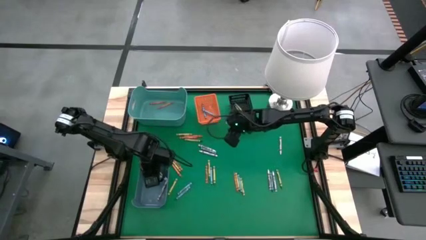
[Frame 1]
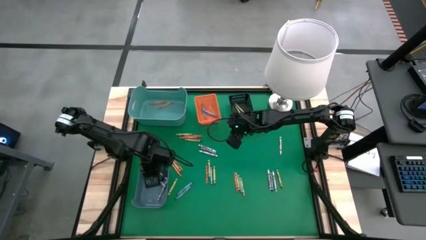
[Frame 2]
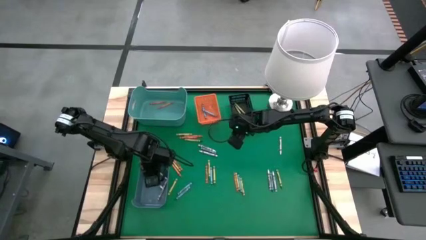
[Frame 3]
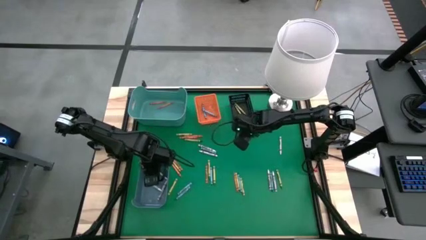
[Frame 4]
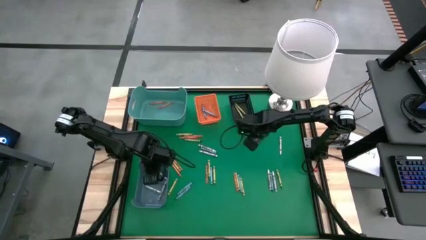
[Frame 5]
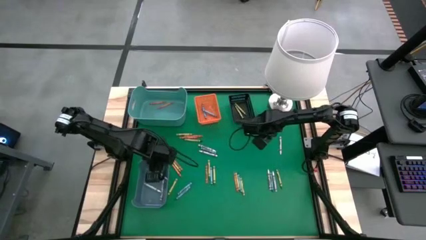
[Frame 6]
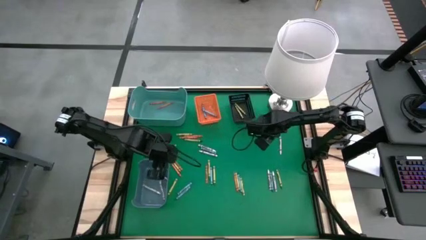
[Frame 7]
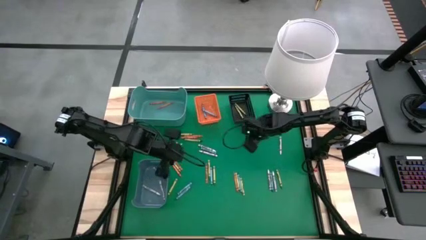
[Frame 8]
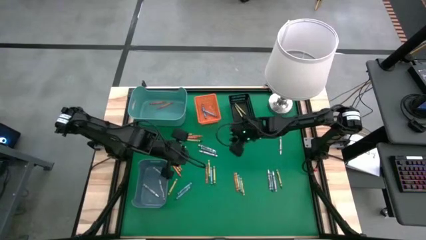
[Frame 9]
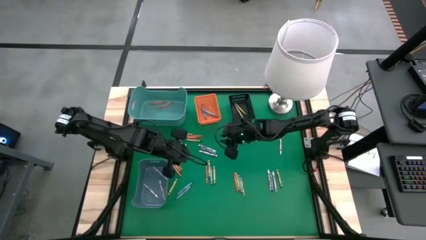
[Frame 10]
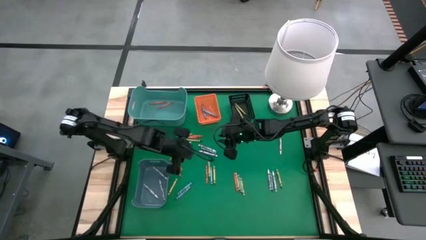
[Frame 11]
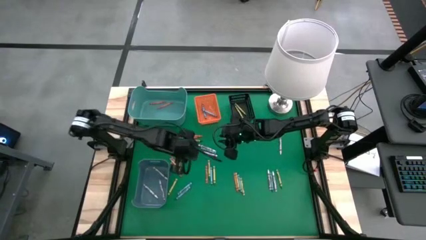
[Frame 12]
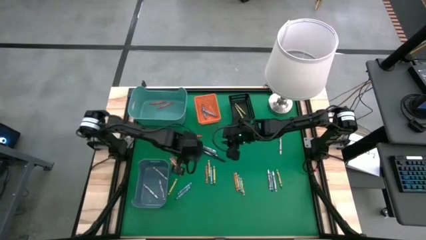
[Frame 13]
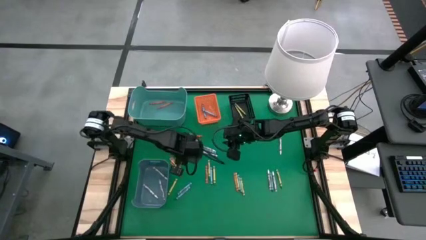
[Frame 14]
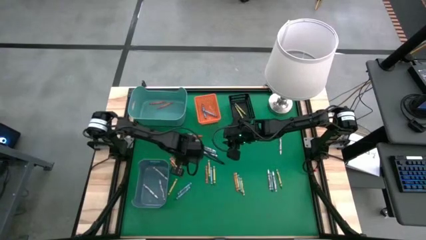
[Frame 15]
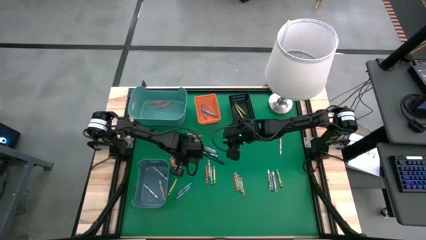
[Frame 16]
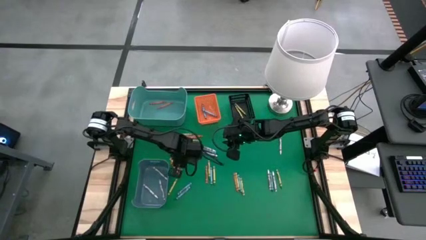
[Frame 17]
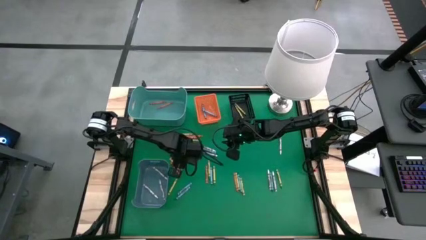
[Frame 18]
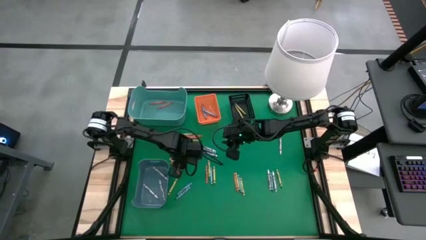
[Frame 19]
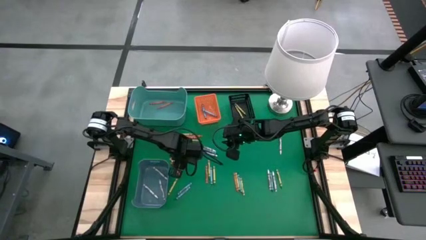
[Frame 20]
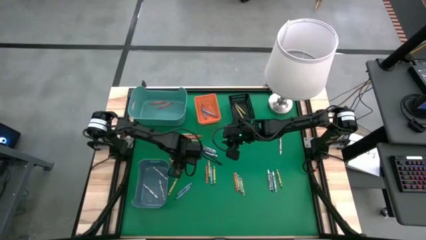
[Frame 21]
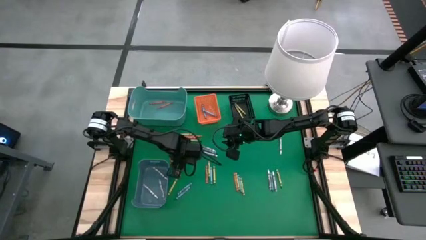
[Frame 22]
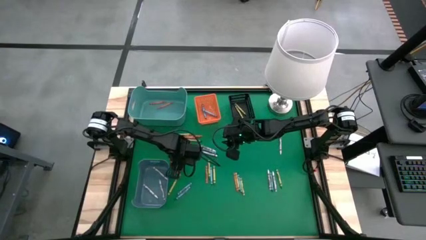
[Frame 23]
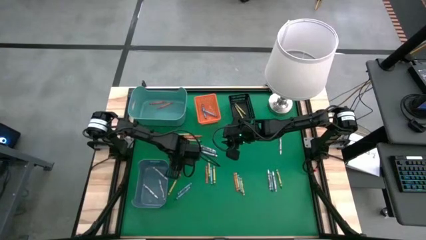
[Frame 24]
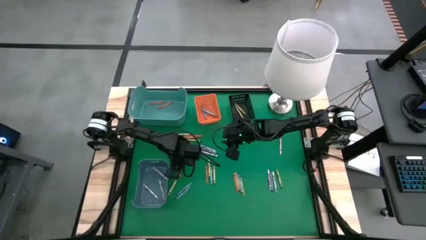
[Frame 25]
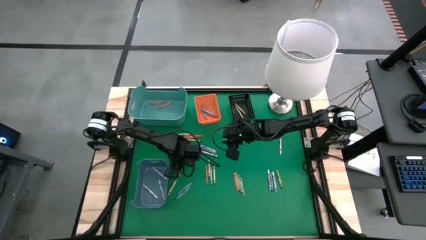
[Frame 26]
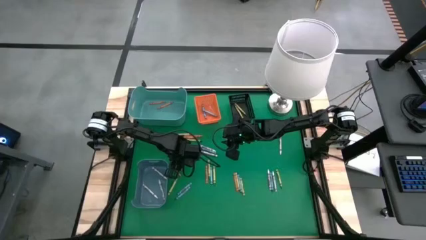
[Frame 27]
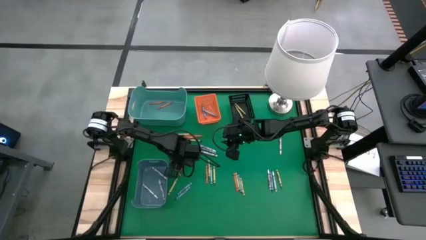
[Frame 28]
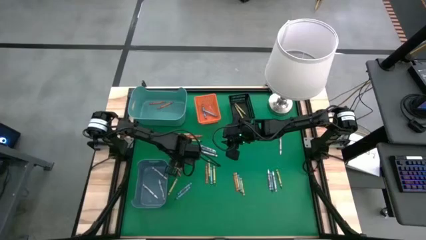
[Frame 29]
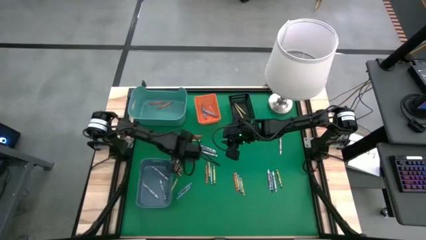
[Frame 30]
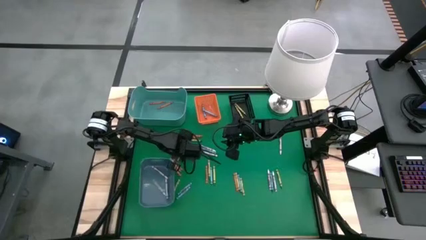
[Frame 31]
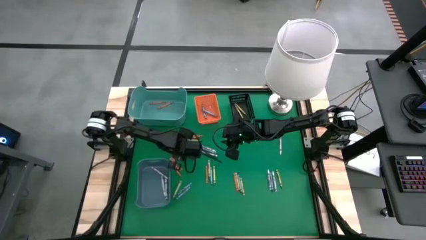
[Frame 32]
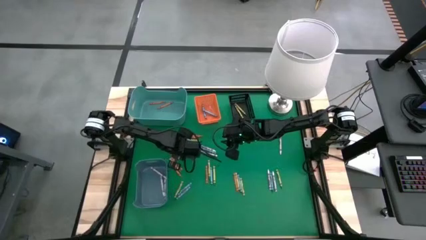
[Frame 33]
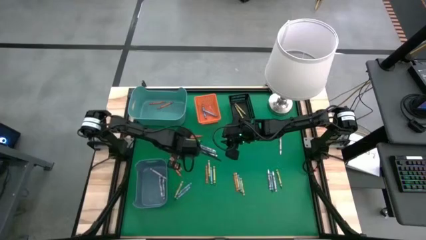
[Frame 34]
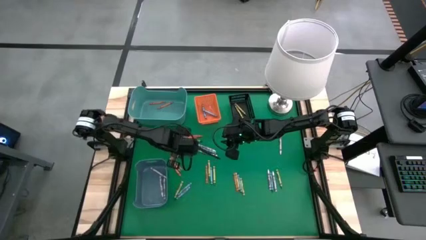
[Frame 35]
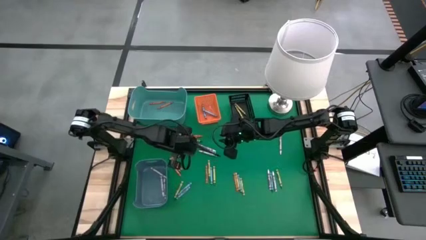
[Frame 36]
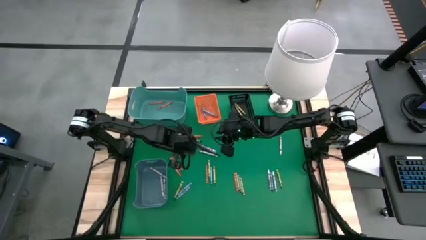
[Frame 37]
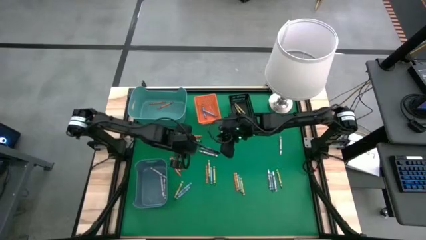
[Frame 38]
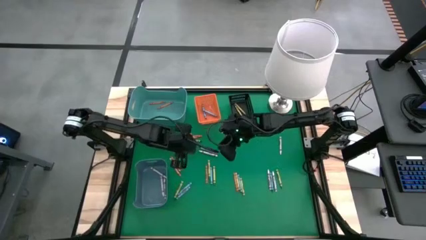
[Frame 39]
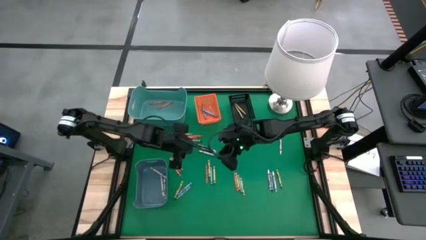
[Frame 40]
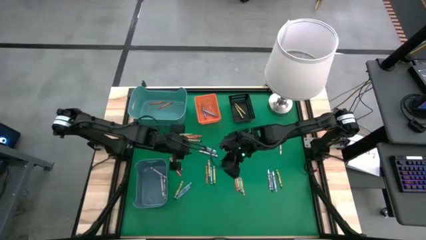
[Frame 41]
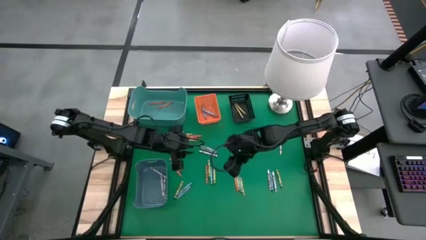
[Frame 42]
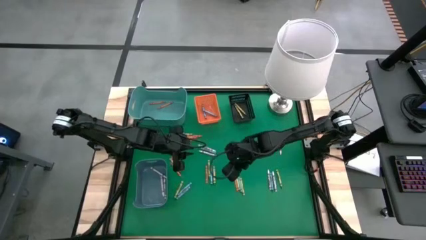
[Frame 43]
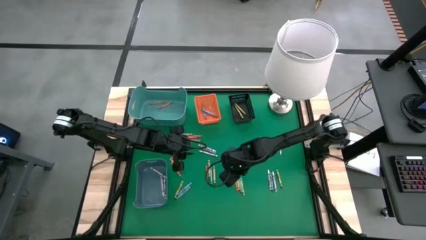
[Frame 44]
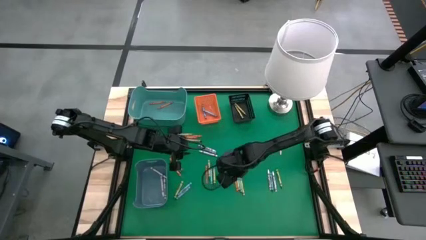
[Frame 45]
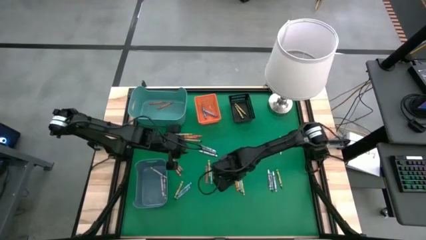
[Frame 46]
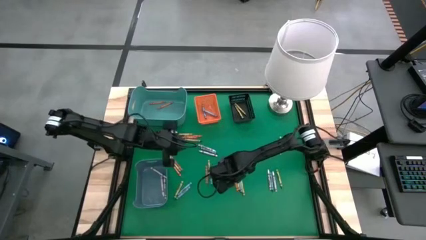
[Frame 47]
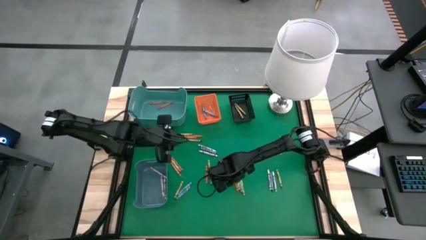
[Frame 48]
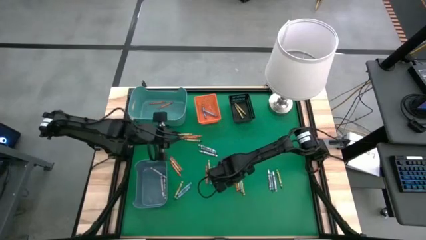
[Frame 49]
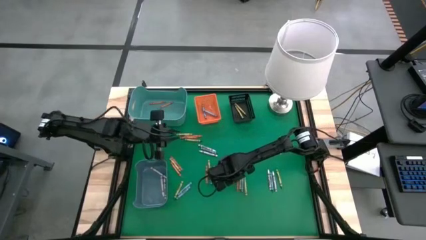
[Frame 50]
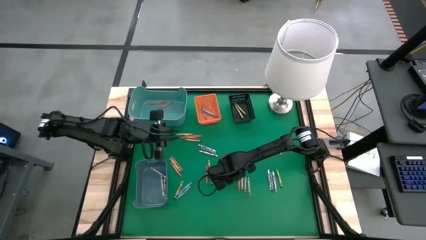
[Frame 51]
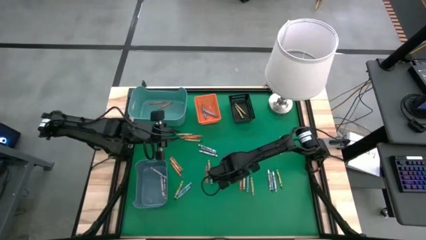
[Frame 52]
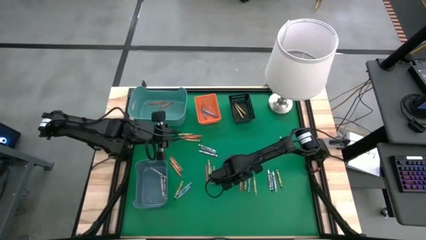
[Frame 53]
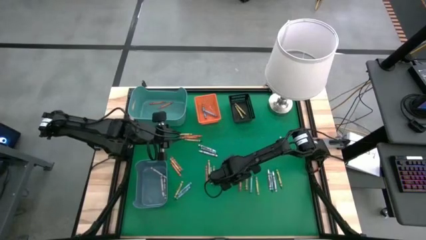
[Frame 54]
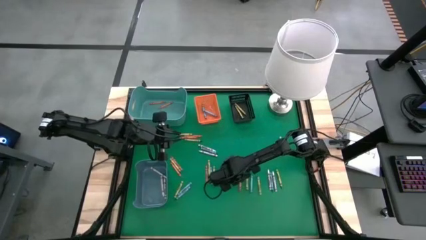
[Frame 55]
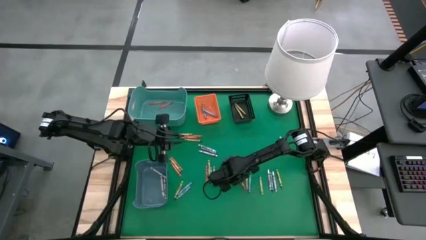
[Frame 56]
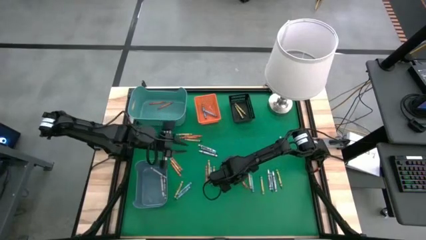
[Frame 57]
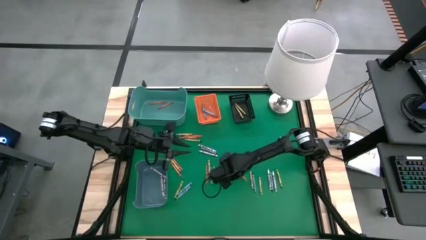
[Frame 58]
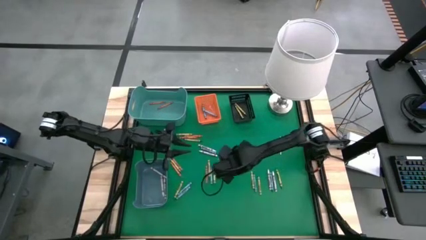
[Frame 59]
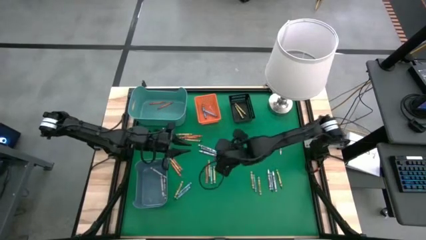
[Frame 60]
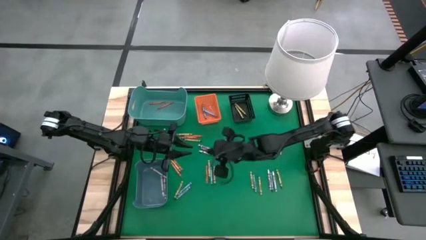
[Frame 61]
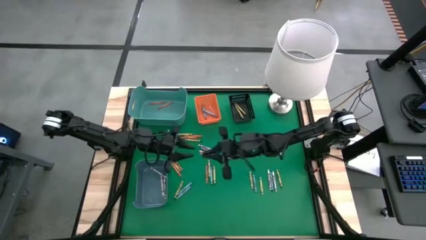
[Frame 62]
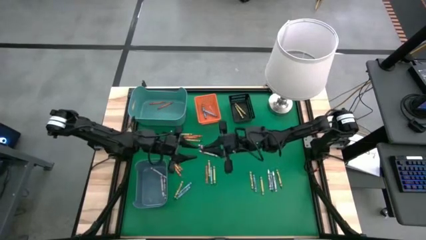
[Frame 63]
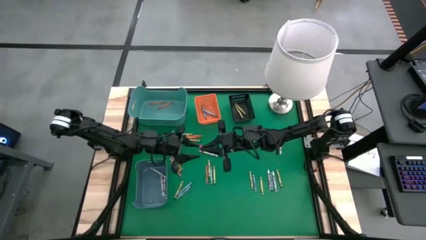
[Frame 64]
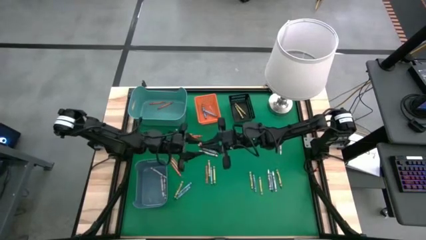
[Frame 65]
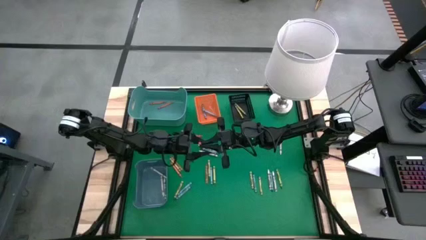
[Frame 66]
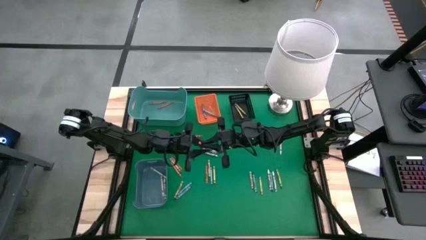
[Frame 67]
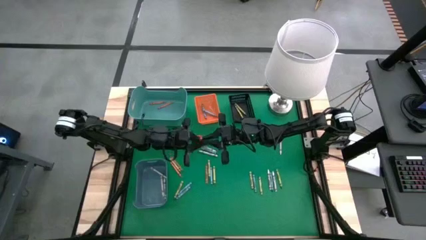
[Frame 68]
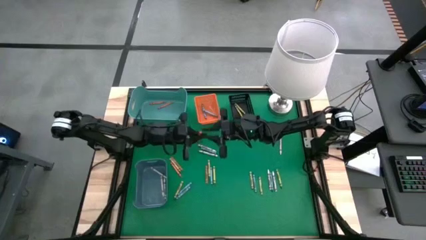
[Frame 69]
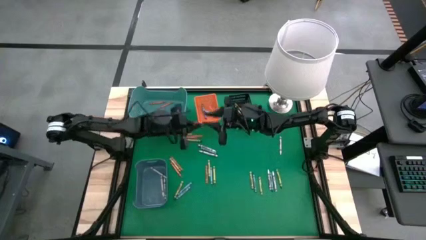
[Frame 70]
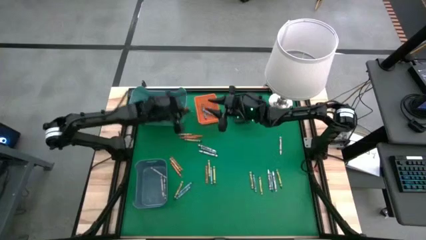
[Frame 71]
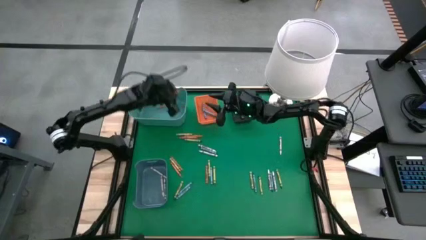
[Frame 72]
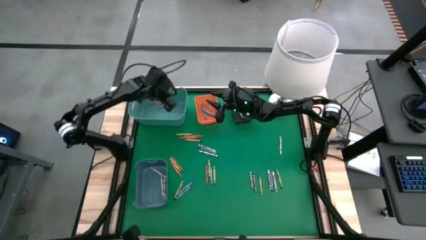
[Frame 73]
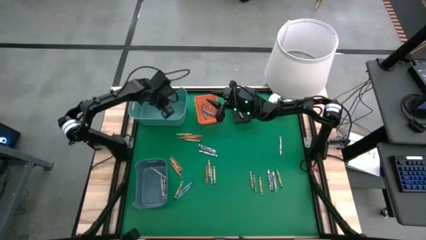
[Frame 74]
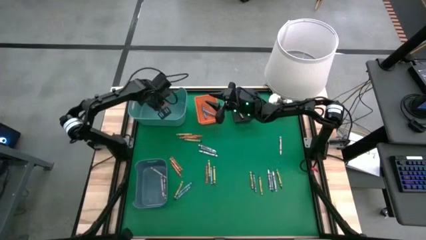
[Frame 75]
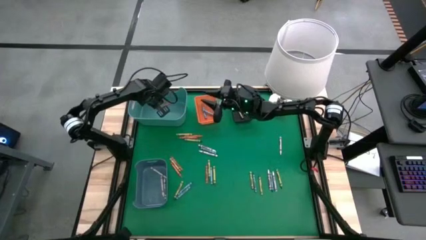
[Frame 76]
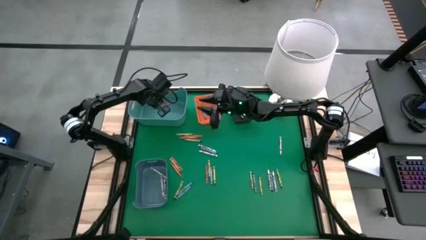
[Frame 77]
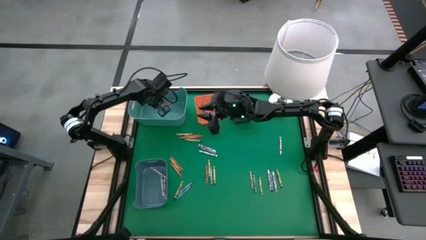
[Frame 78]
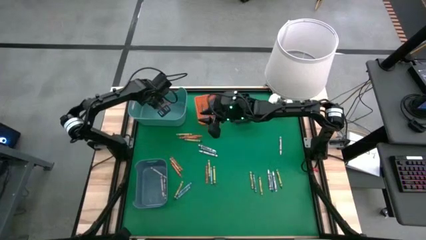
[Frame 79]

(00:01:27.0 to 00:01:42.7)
Task: Sort crayons
Put the orange crayon into the green bin
